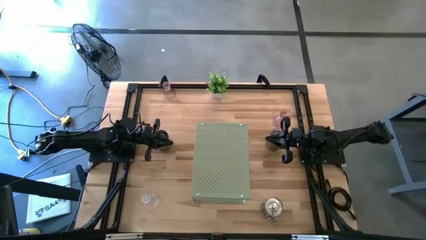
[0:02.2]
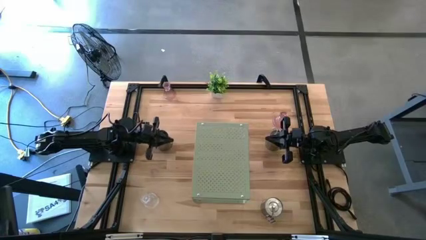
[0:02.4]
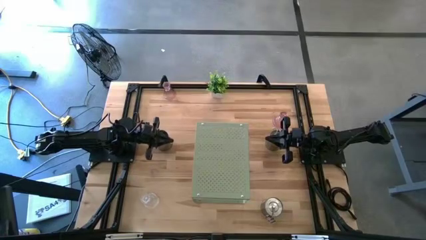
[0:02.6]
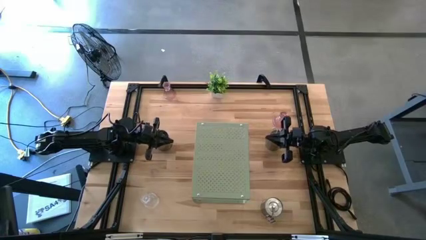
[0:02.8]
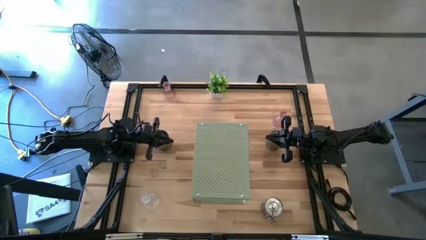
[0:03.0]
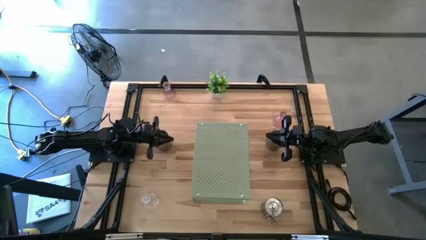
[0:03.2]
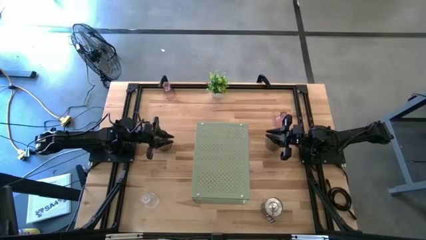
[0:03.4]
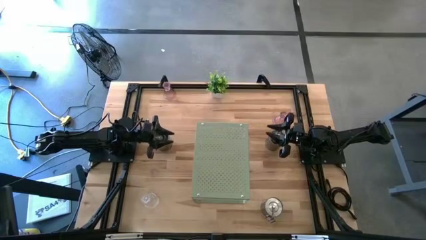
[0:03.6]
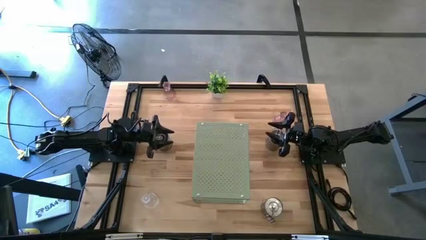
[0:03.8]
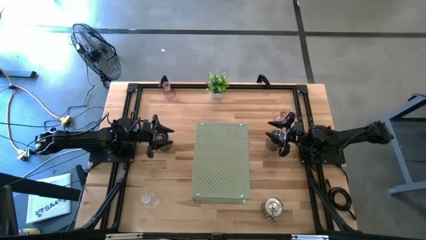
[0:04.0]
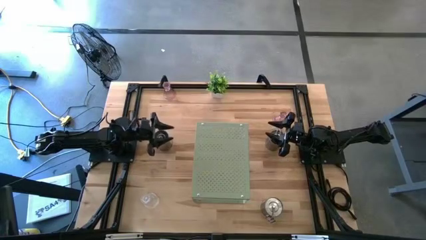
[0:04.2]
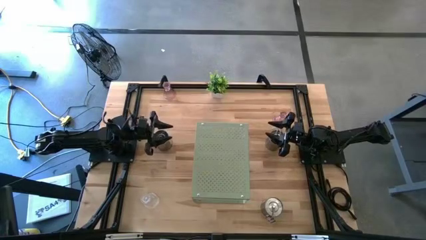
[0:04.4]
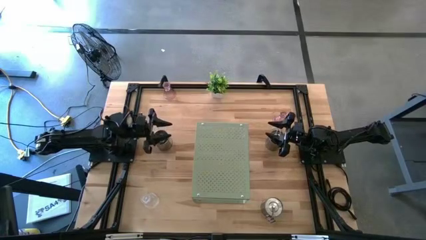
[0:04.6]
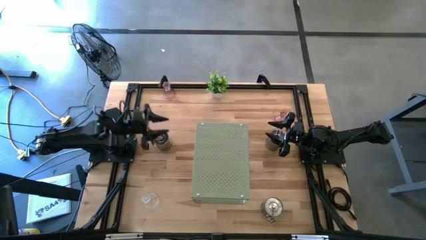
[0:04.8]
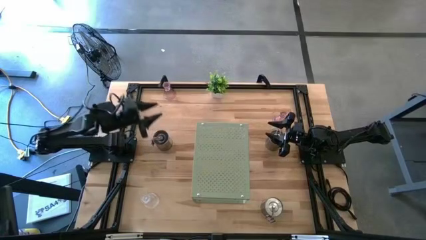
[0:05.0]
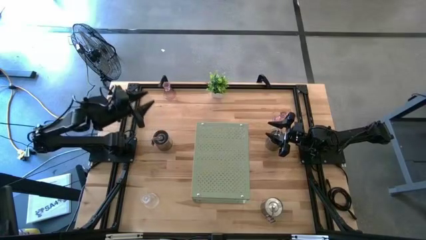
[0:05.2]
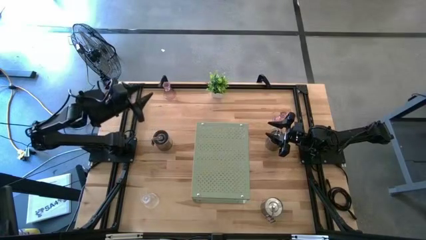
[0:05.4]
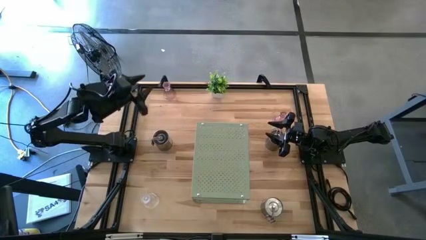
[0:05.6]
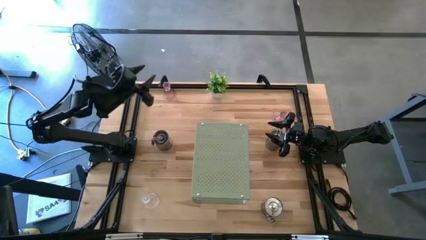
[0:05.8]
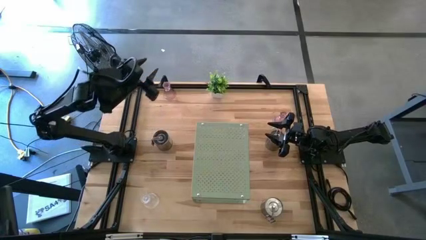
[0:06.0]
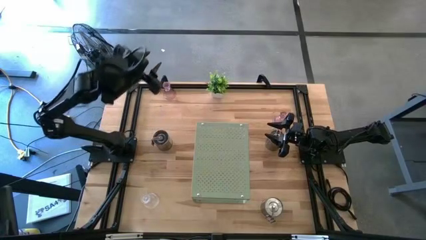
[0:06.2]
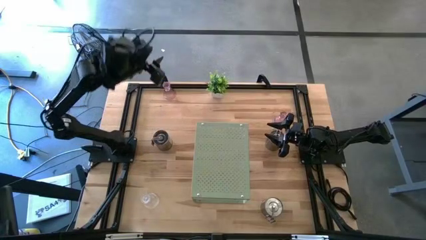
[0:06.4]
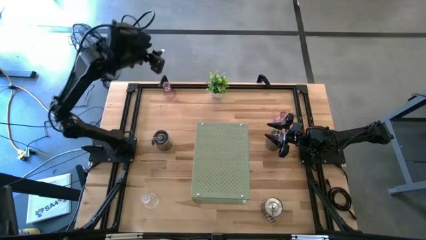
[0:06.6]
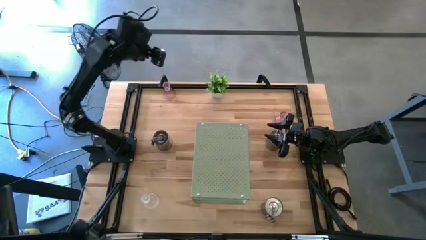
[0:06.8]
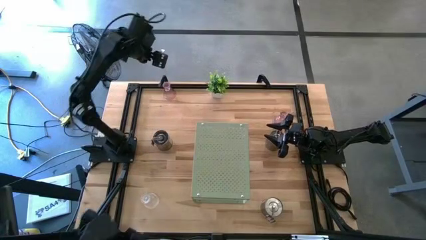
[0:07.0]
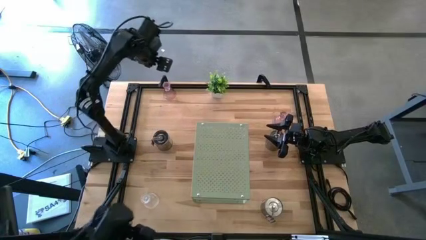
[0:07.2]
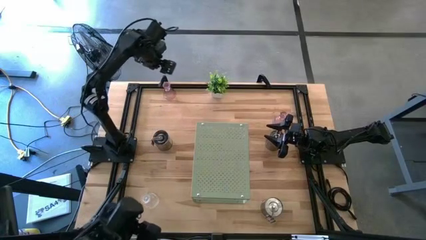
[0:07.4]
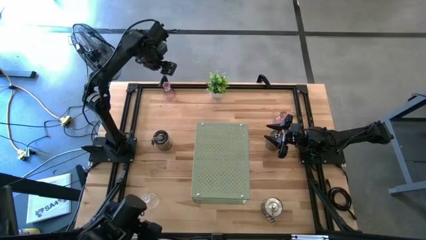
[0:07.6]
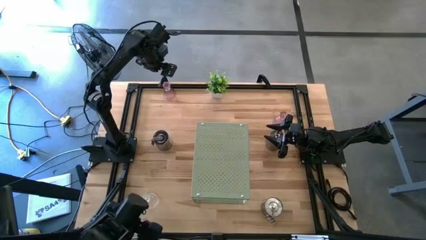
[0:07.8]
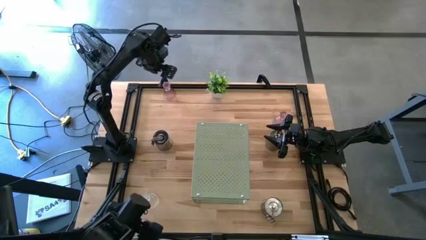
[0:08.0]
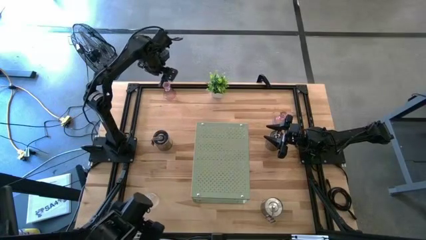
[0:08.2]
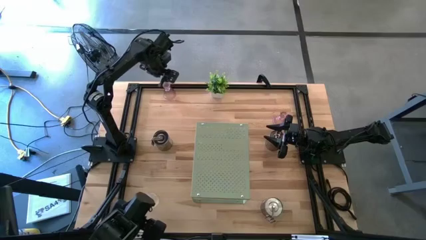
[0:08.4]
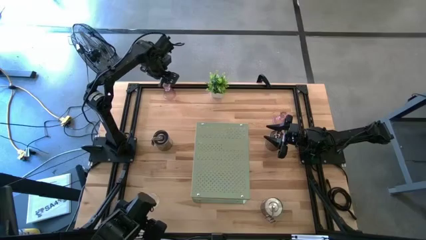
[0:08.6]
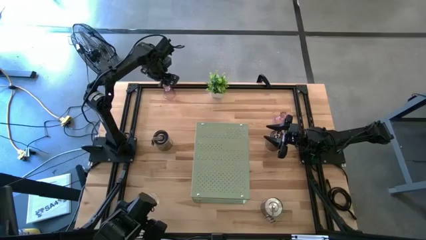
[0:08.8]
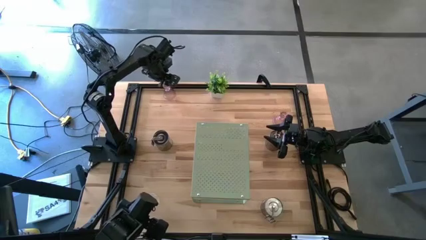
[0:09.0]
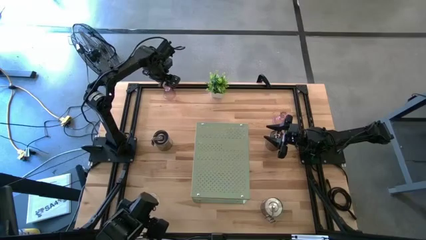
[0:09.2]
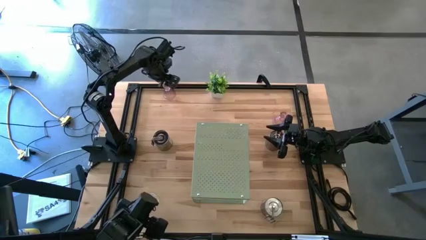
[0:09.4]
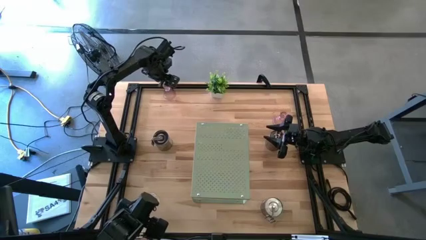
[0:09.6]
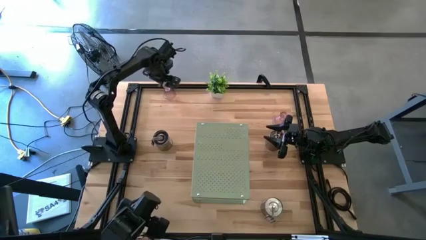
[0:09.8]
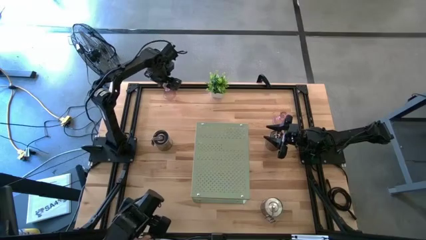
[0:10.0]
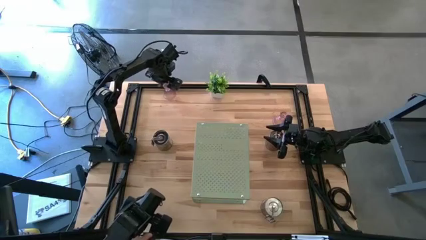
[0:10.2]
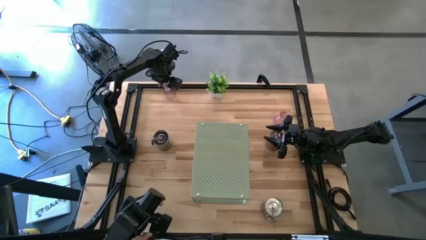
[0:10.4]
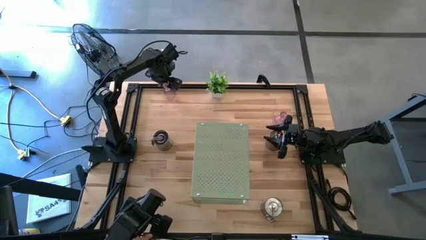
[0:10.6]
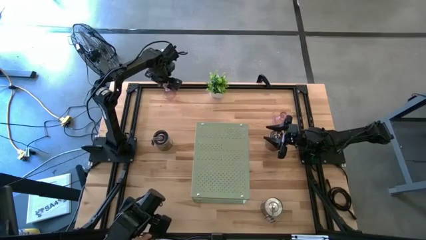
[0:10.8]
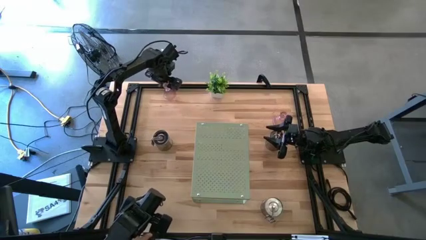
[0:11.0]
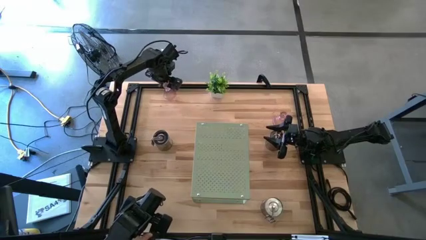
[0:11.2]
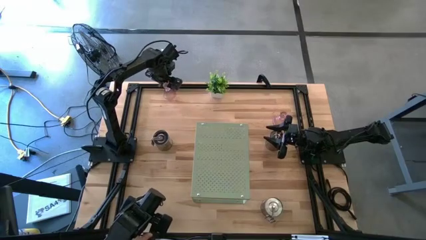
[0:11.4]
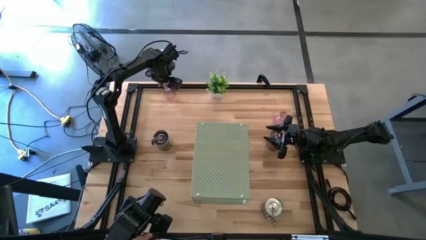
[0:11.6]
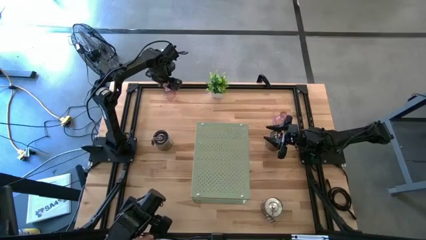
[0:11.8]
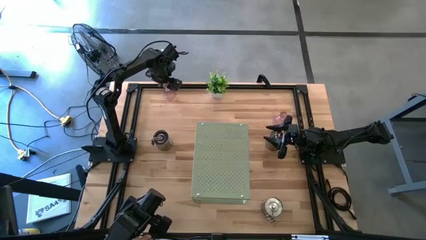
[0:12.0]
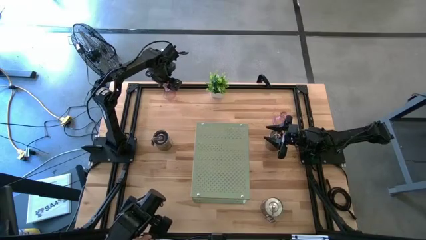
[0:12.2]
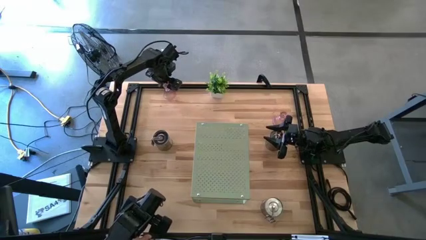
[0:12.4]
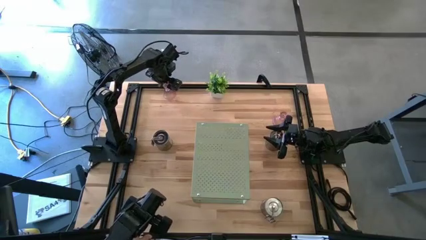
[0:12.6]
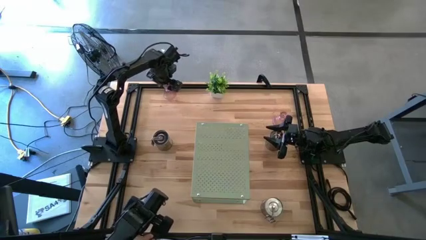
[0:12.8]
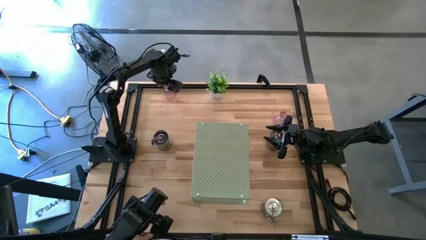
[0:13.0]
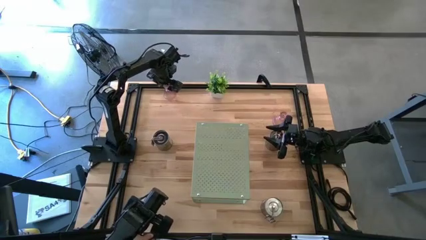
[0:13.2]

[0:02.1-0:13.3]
Task: Pick & Place candle stick holders
Put the top pink transparent candle holder on the shelf
